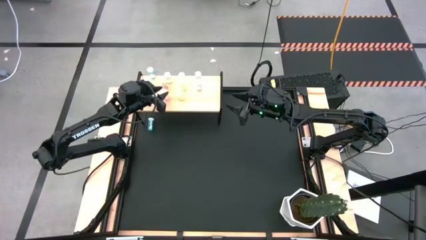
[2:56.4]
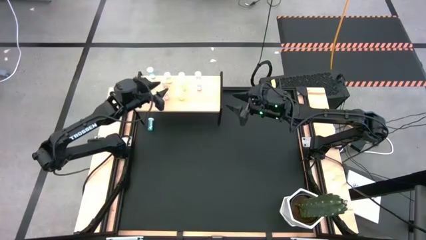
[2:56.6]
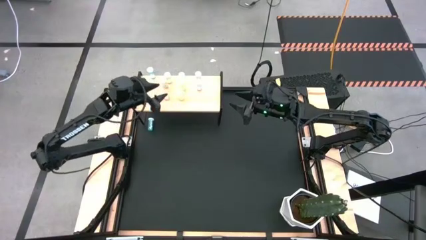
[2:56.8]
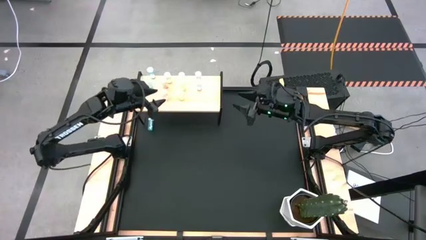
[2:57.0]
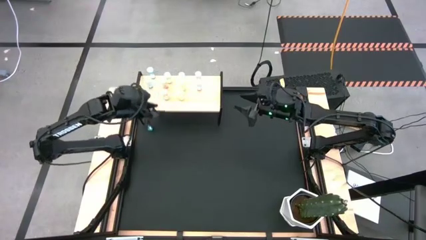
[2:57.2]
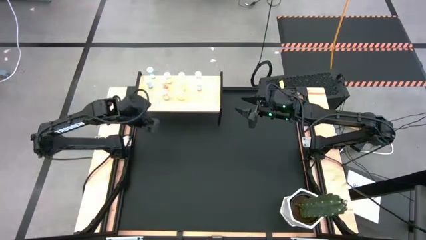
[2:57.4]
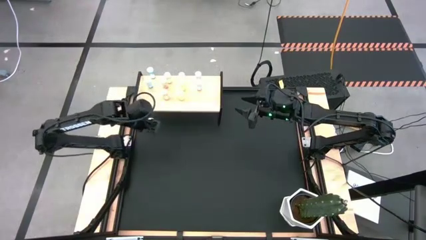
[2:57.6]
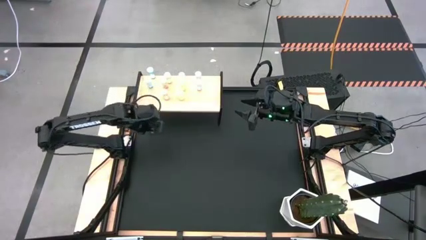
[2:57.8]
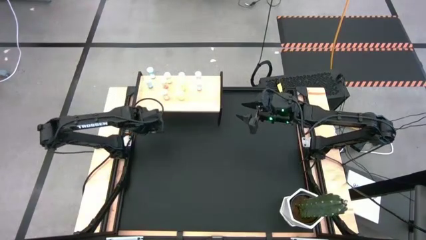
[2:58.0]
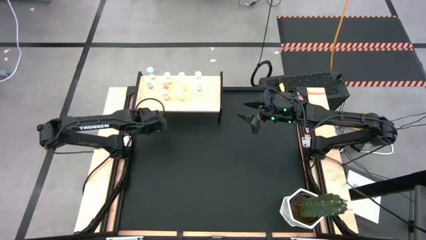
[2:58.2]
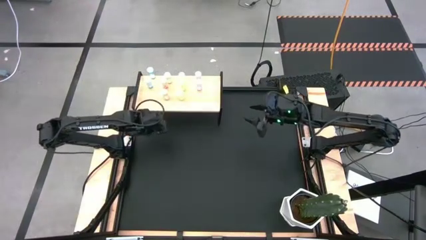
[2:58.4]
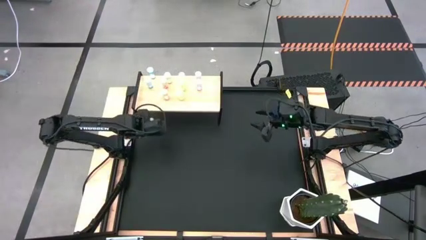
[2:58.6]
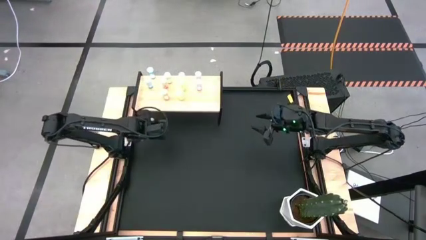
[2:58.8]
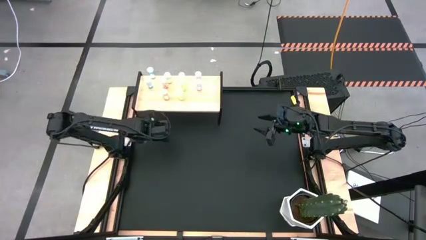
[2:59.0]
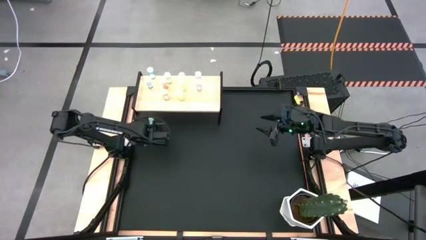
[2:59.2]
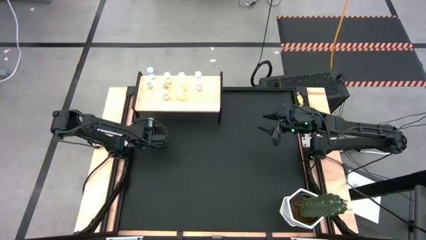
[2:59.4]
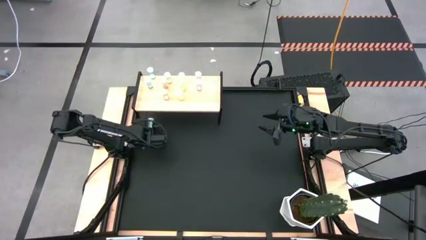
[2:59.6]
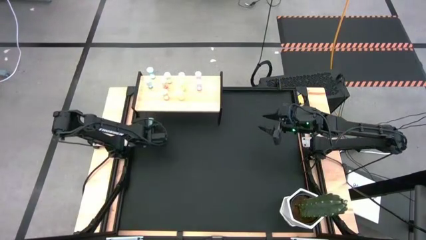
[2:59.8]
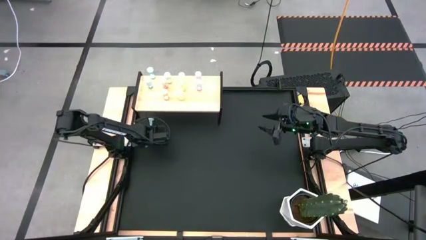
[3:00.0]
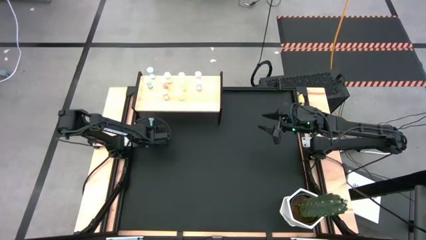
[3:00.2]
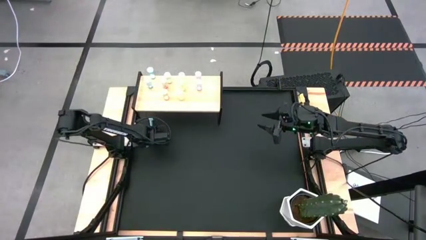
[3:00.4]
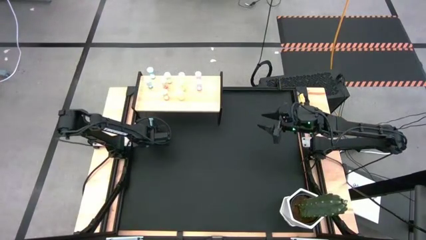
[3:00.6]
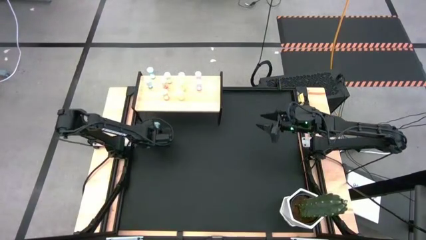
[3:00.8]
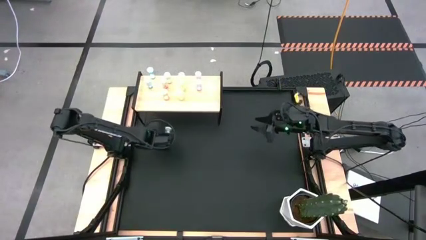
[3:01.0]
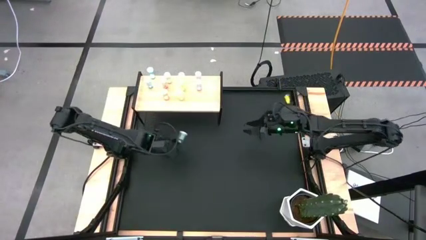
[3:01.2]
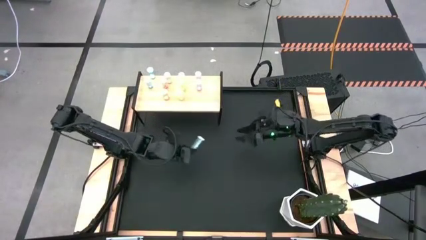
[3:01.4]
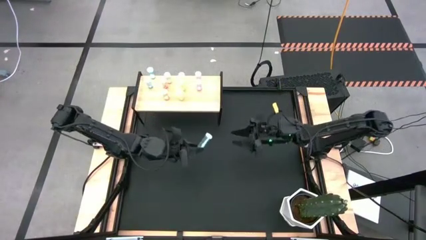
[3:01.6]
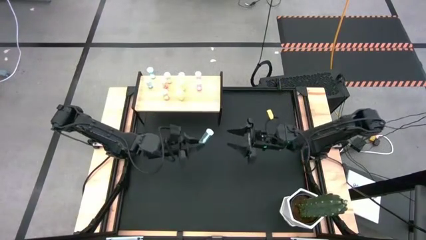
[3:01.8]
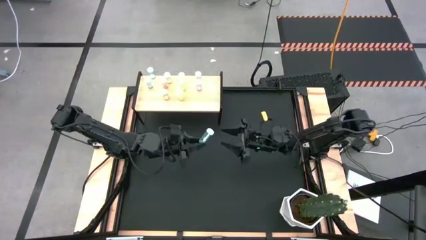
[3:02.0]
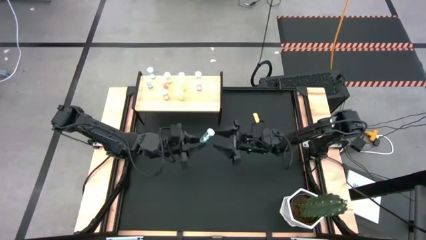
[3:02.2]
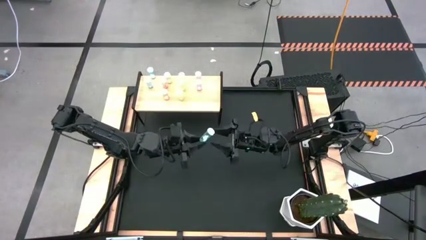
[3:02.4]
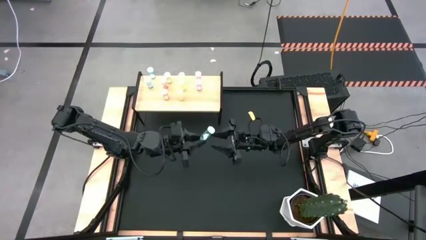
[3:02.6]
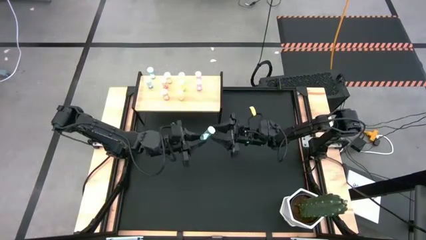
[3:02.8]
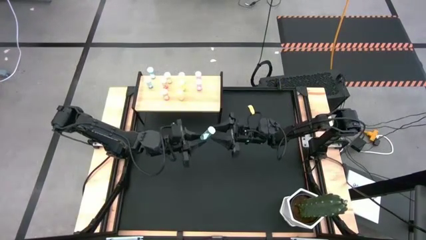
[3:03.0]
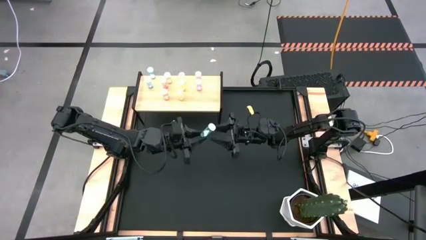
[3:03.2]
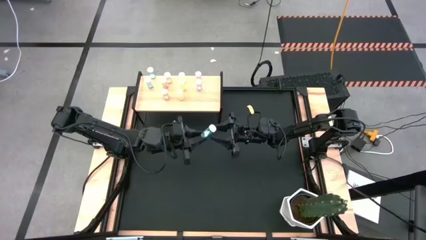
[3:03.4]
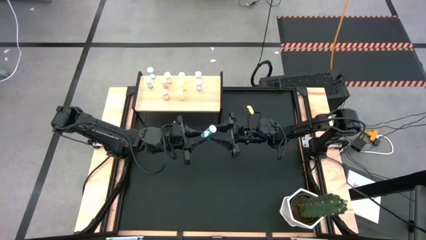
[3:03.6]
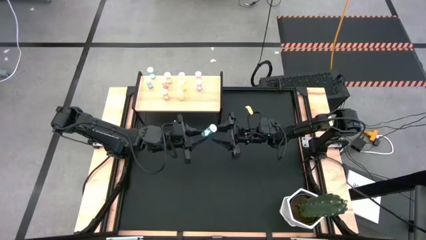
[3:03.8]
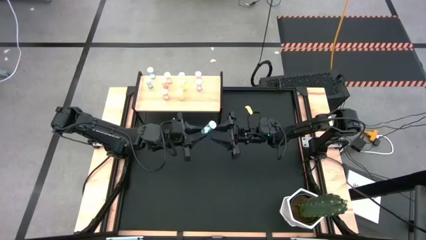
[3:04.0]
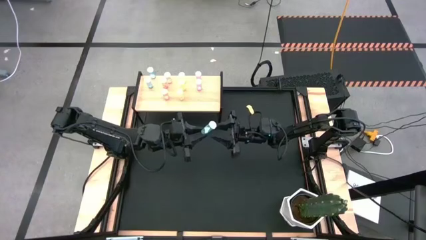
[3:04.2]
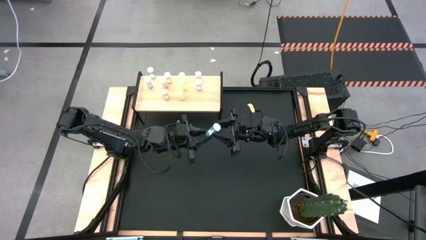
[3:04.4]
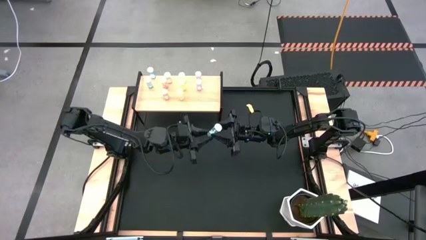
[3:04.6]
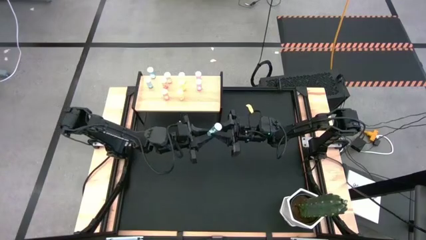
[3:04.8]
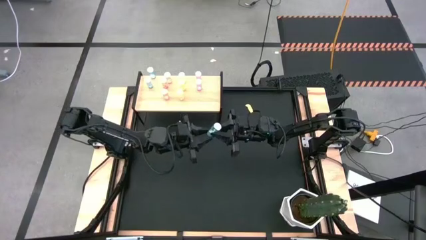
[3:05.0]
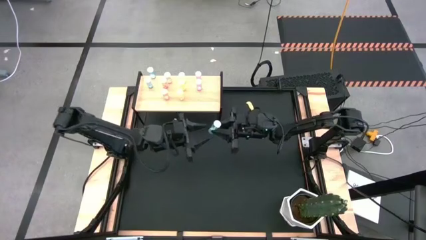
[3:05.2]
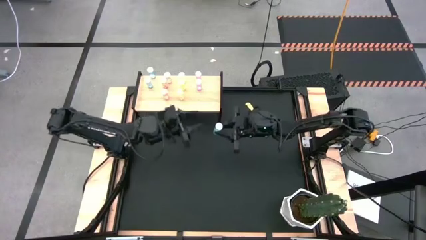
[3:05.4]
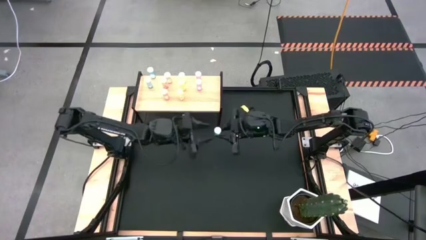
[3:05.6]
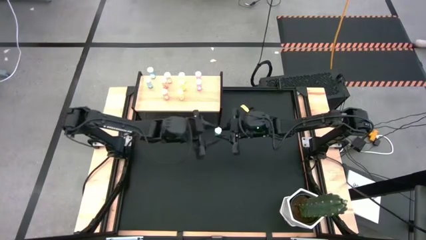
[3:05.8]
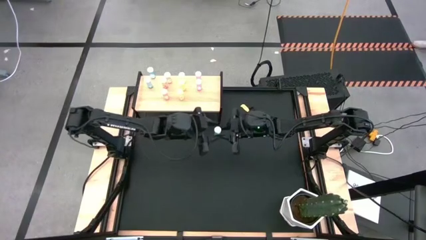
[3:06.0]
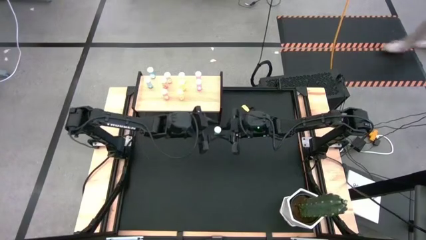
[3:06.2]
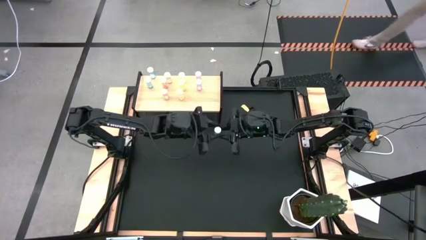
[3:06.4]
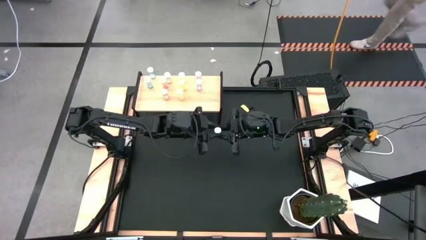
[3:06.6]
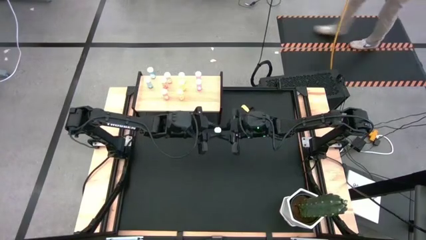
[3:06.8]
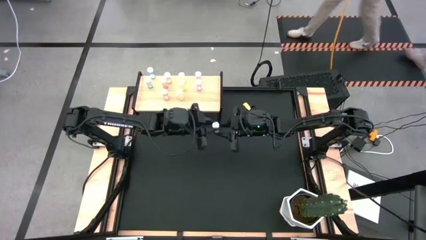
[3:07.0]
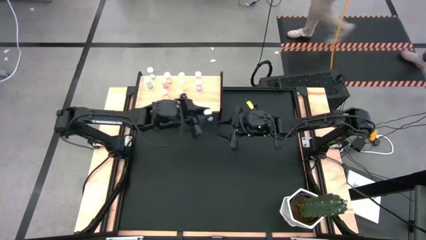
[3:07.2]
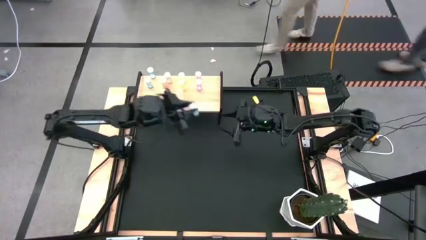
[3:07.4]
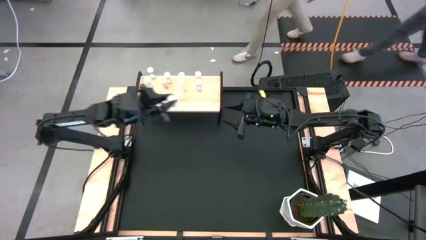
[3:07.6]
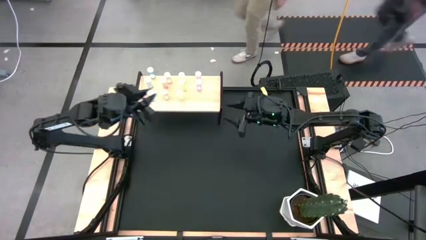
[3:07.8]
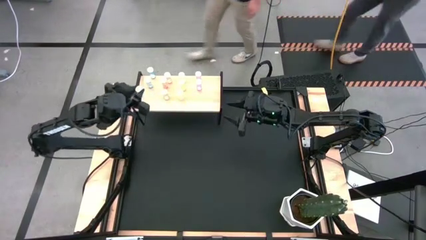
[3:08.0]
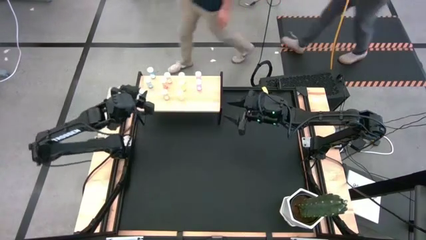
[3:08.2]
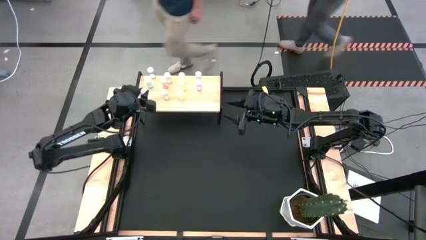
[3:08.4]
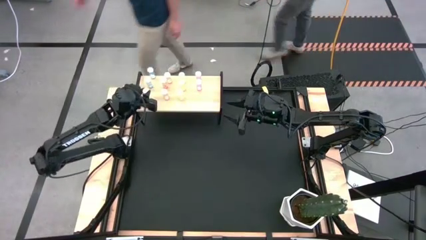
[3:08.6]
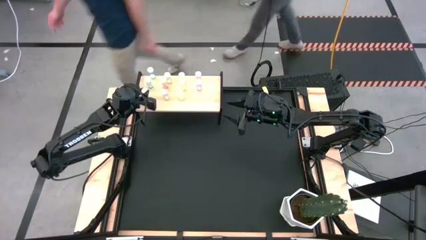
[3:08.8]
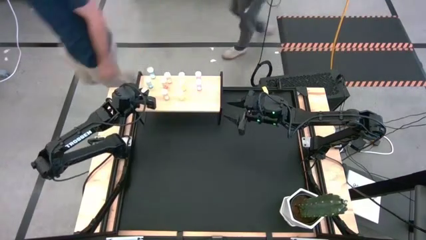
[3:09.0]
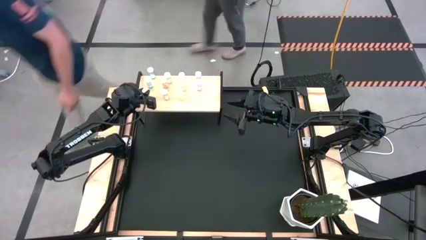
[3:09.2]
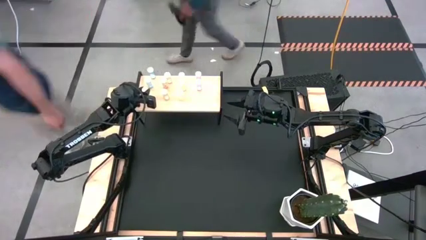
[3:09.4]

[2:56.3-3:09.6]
Task: Pick and place medicine bottles onto shelf by color
Put the blue pill bottle on the shelf aligned with the blue pill bottles
